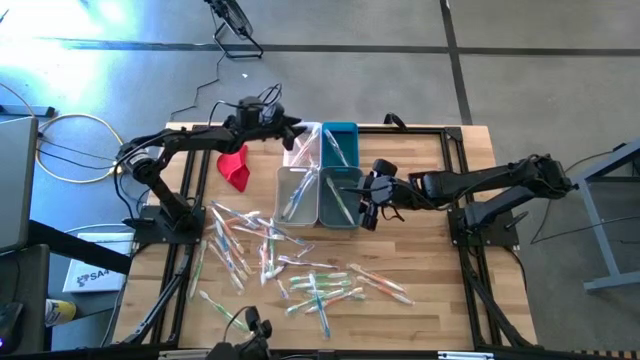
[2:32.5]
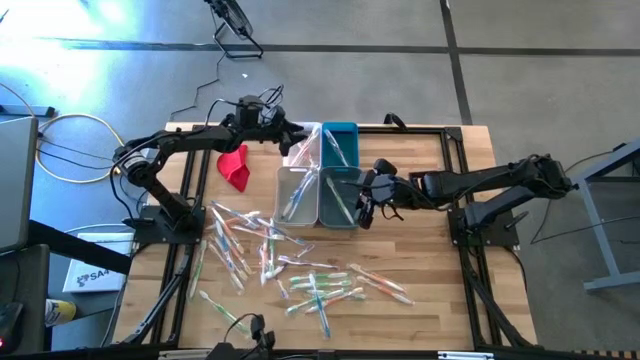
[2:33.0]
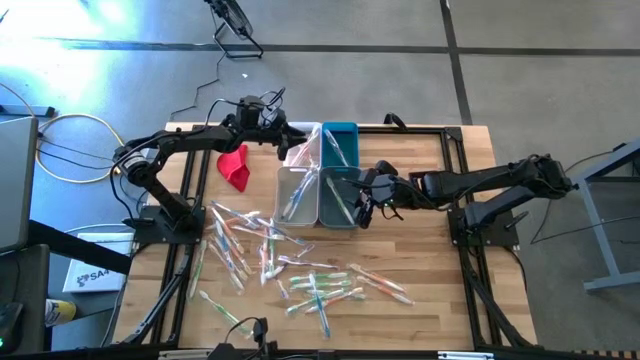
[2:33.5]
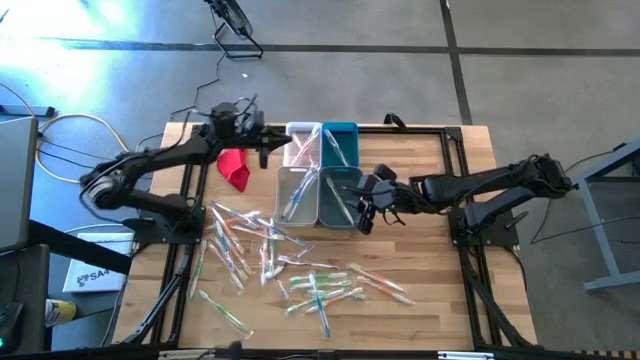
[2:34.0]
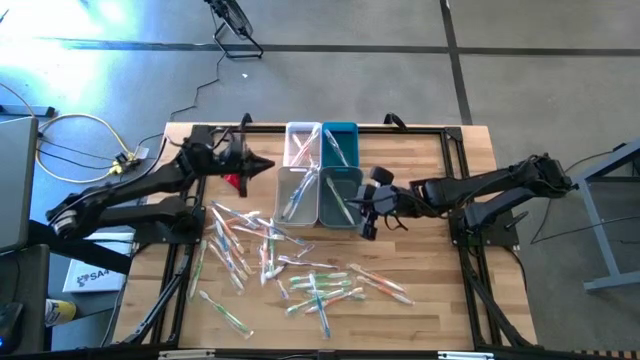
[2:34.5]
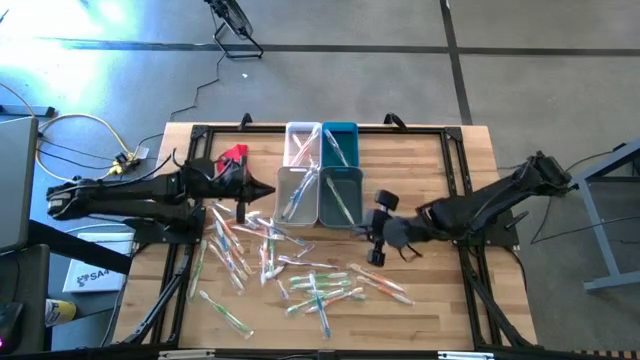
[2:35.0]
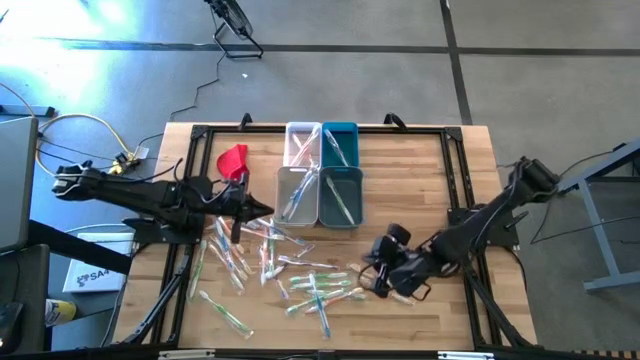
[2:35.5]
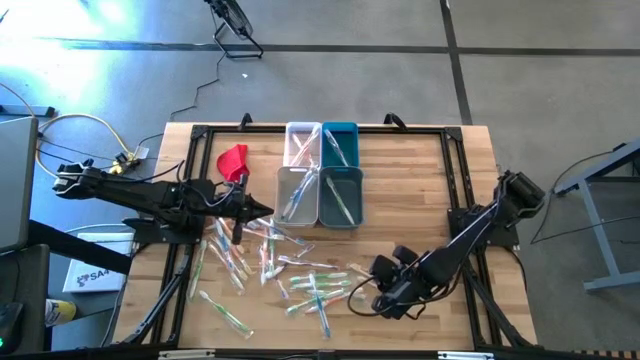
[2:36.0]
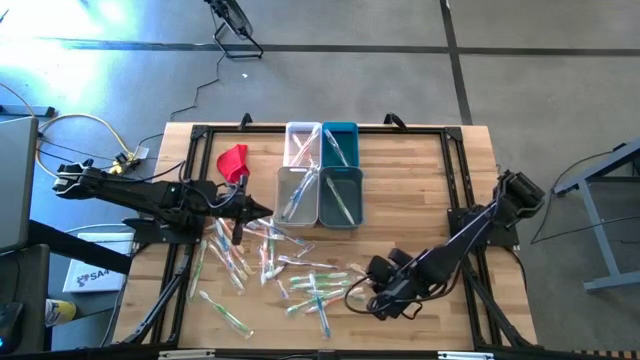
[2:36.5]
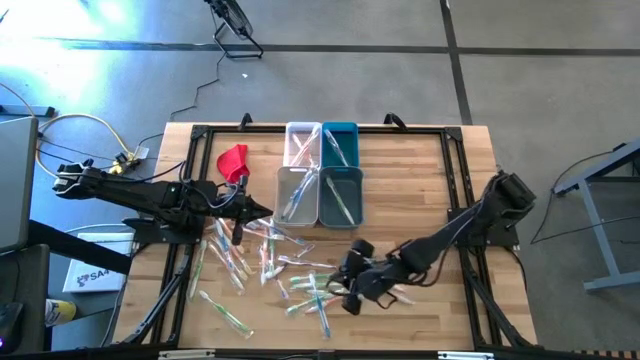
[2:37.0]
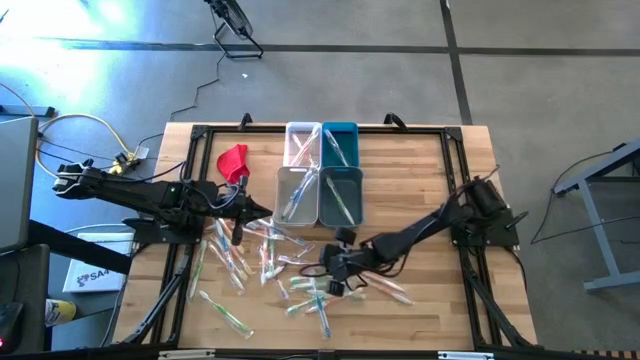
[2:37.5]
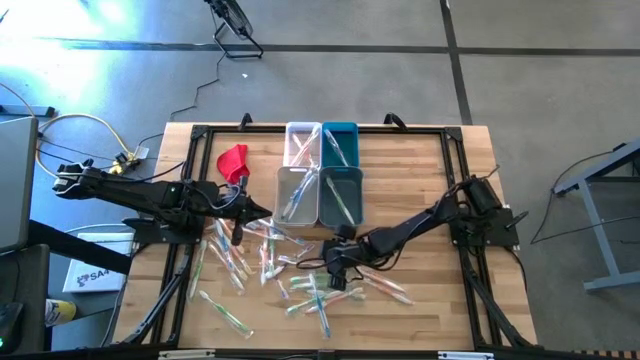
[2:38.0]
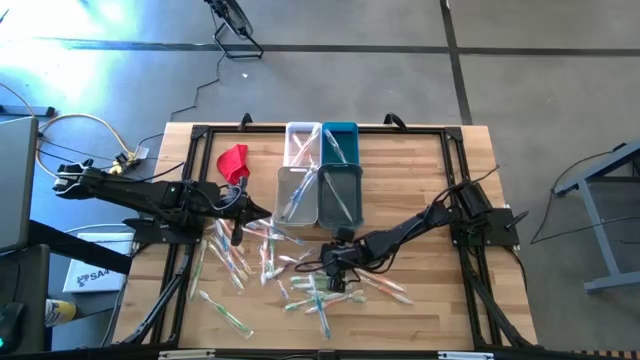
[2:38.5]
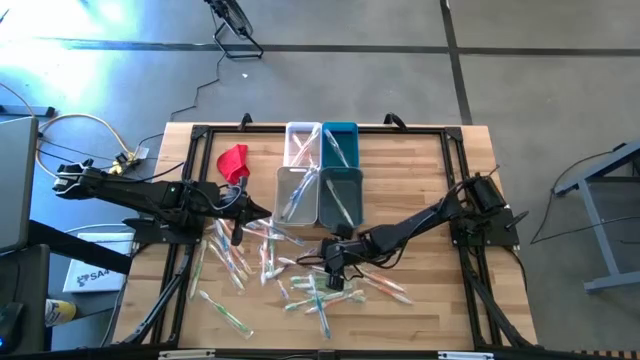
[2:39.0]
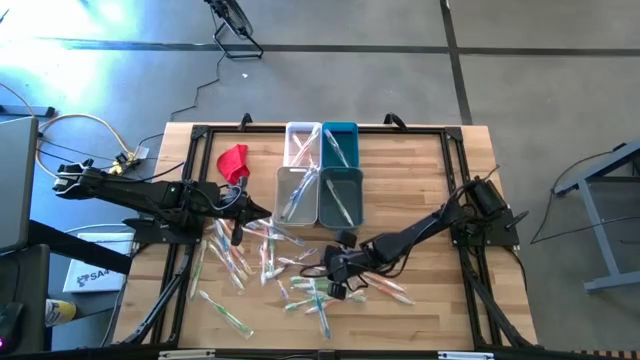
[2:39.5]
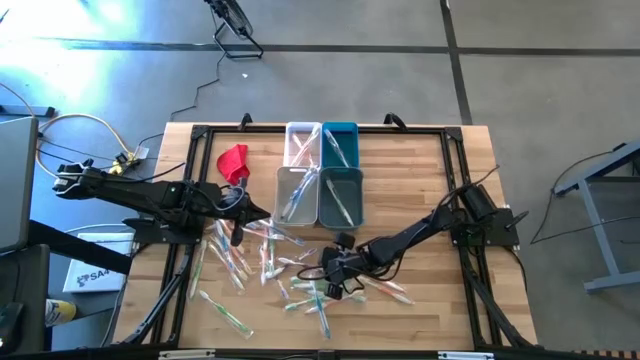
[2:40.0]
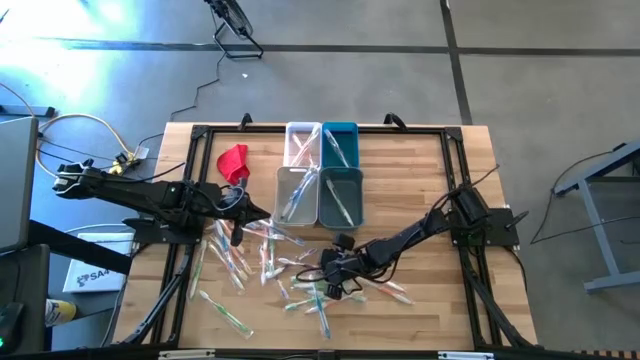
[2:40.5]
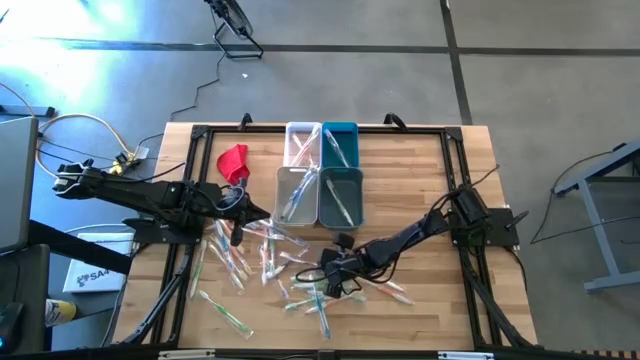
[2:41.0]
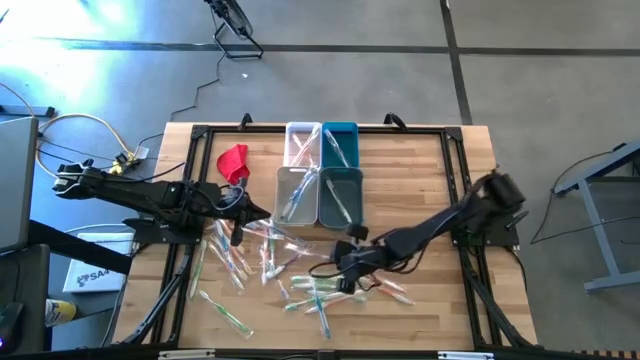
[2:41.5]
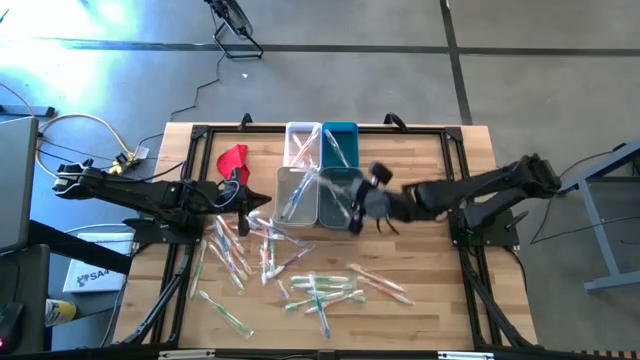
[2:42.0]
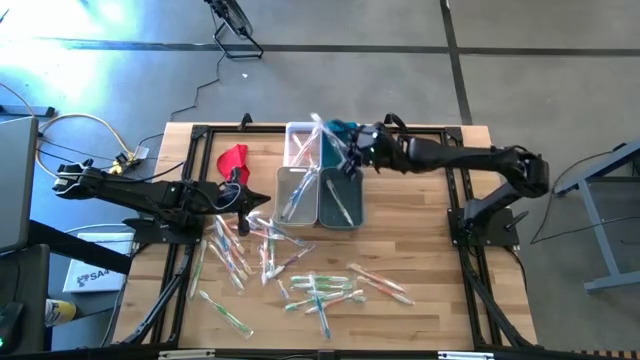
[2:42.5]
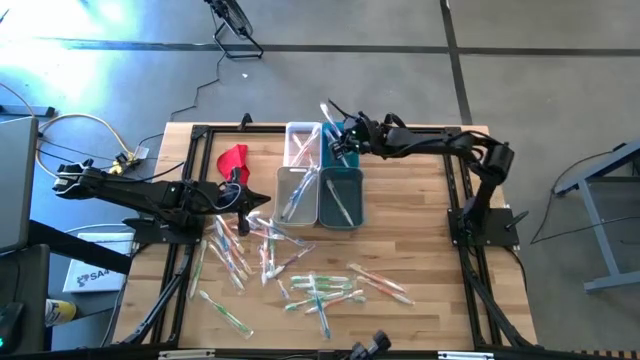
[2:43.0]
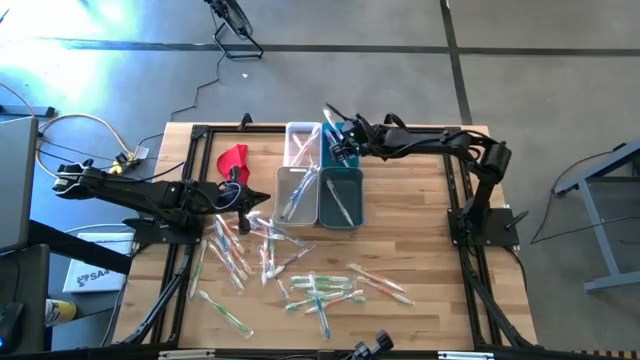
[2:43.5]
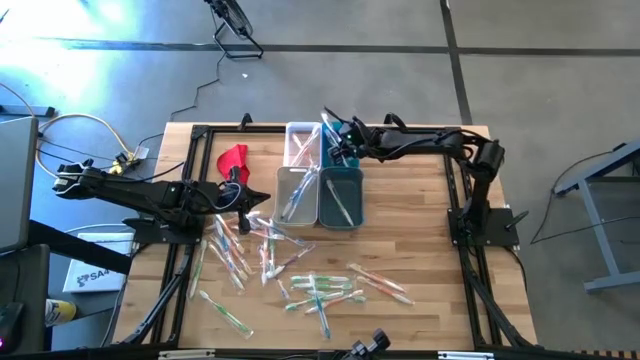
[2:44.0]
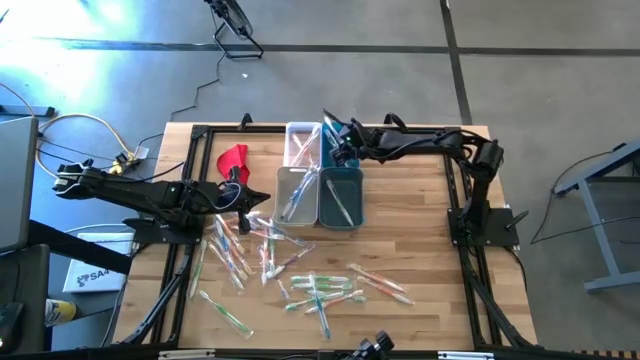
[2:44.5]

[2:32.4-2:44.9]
Task: Pick & Place Toothbrushes
Put the violet toothbrush into the light blue bin

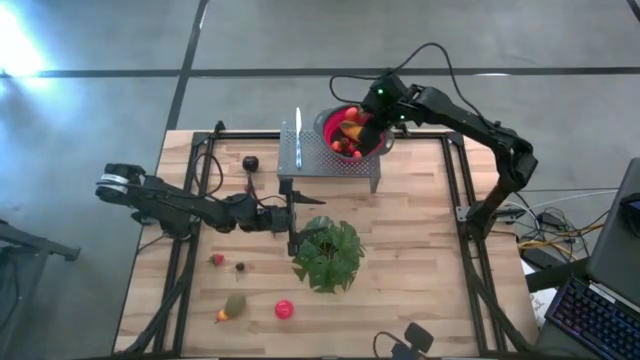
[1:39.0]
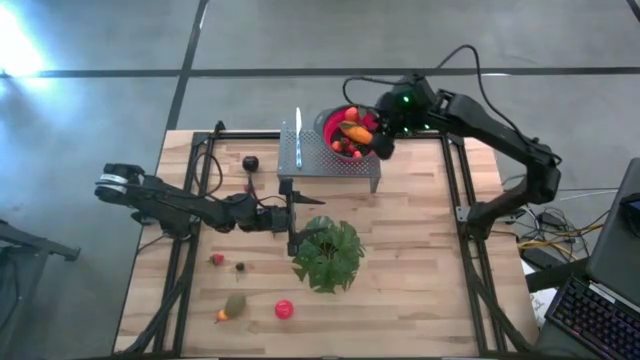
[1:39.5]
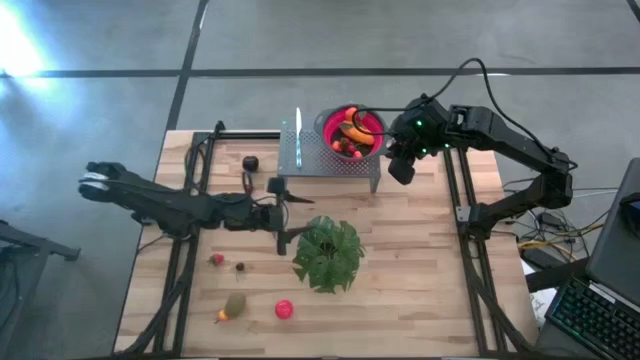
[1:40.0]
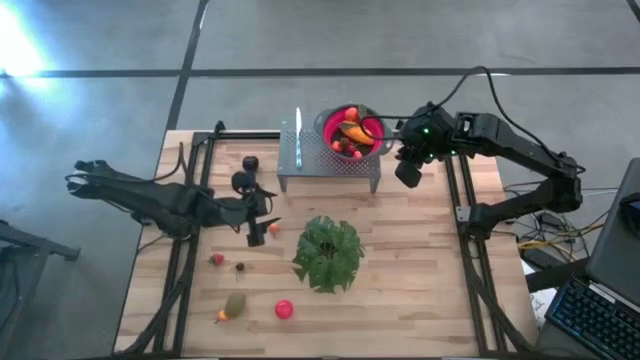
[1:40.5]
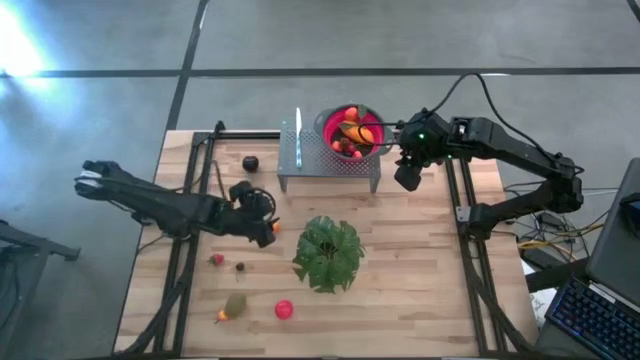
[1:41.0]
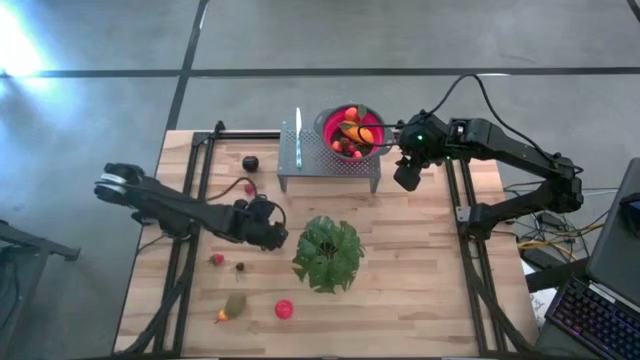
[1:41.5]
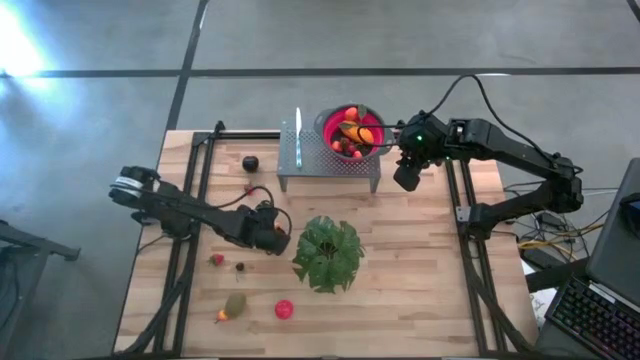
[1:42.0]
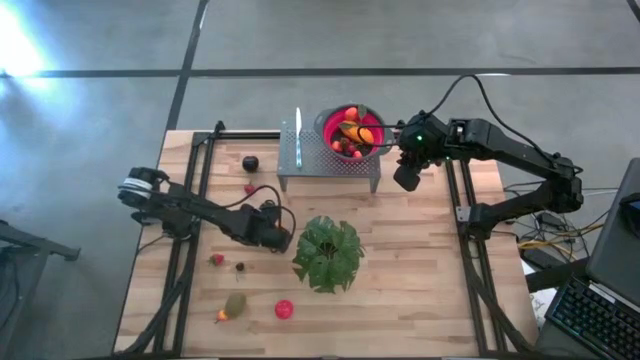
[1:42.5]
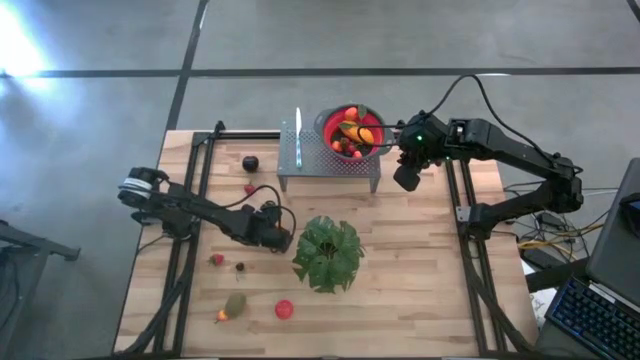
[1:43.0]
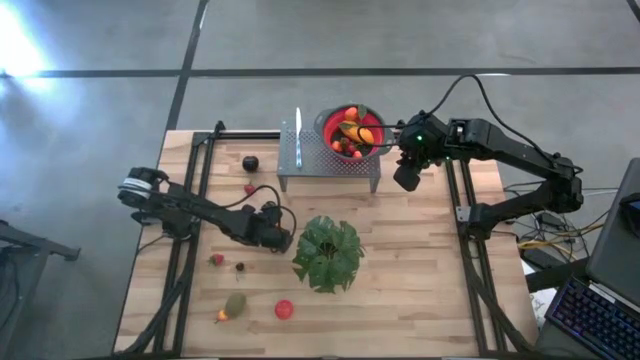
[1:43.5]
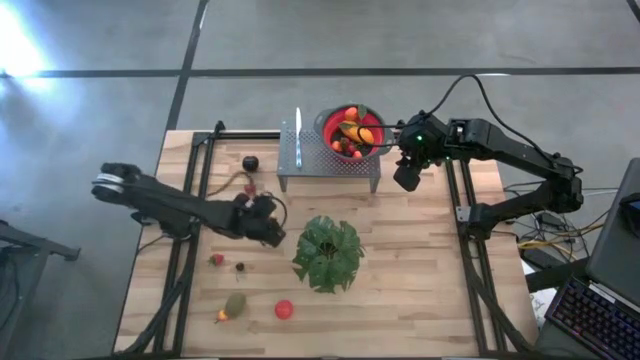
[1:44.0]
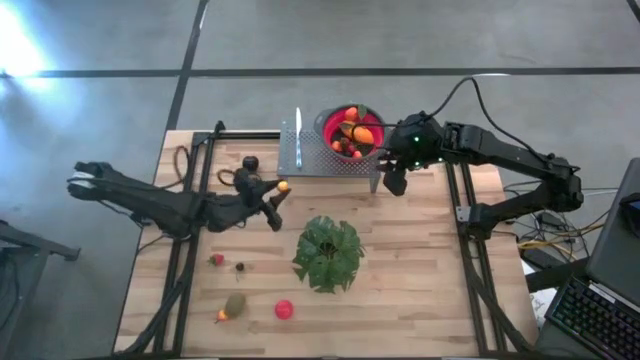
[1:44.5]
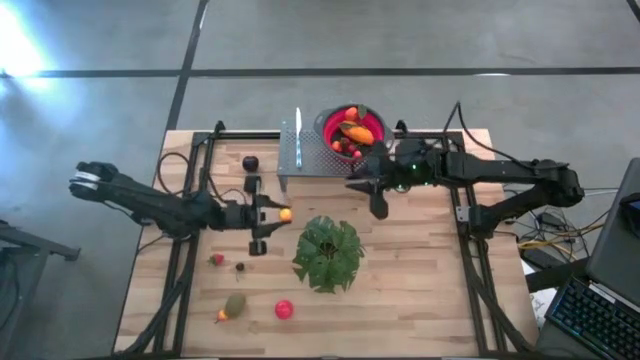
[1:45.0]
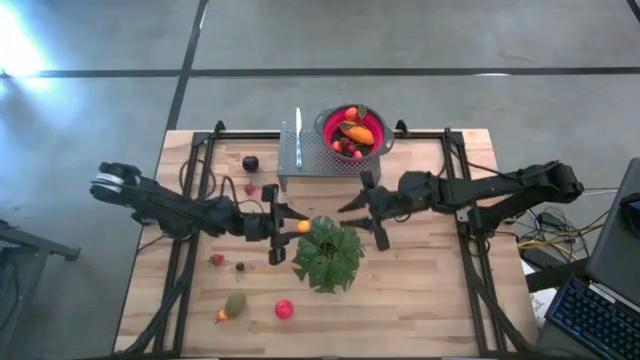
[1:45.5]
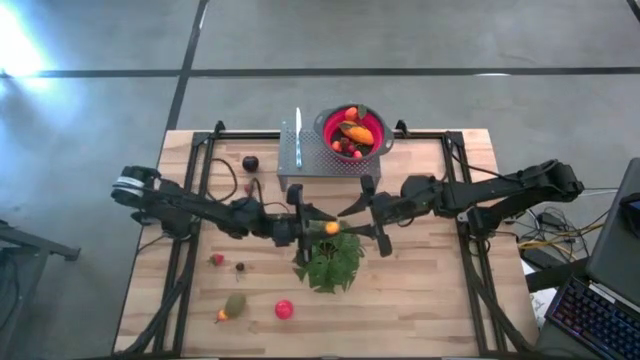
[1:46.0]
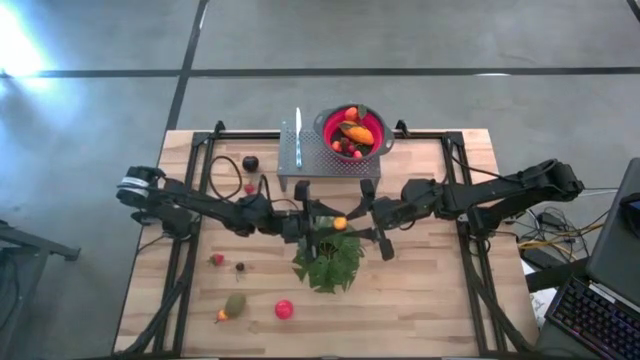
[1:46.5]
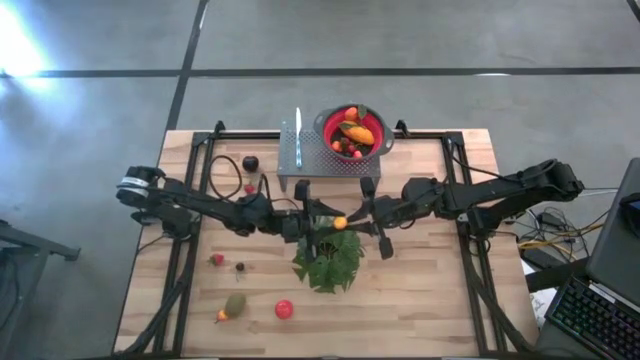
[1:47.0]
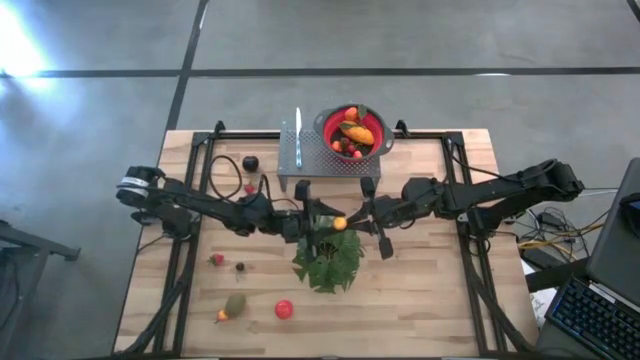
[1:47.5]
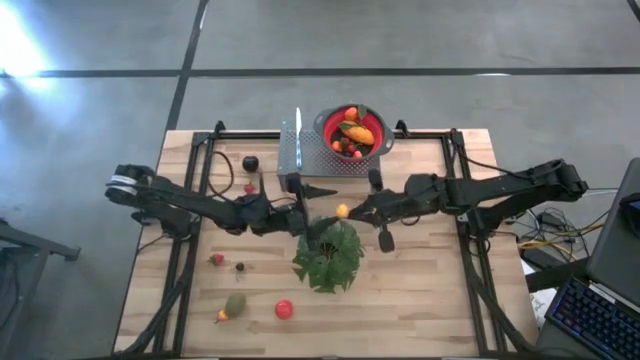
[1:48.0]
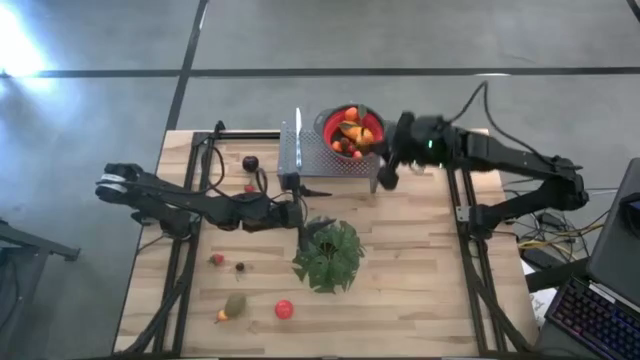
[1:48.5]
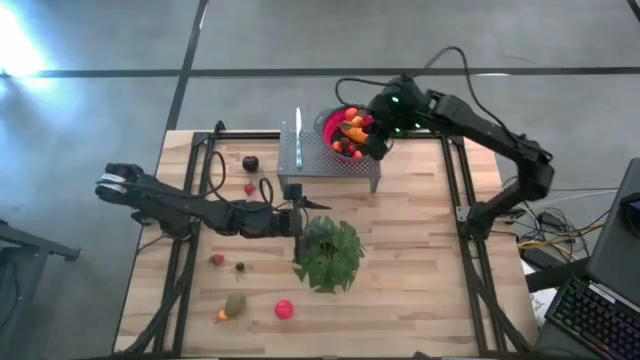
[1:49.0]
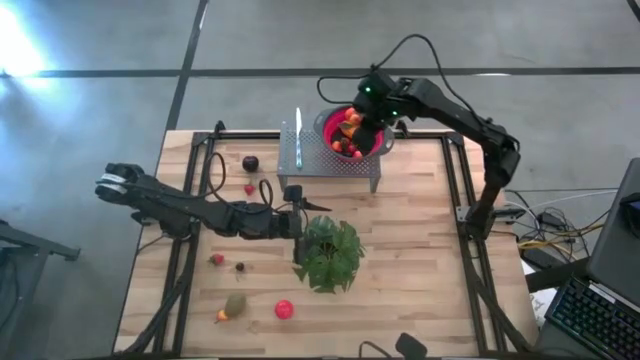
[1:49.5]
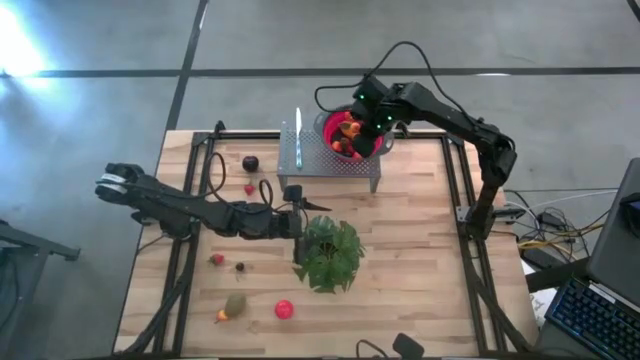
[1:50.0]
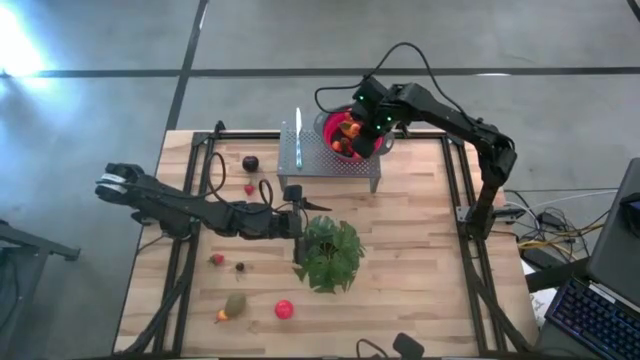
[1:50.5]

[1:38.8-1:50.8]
Task: Pick & Place Fruit
Put the orange pear into the red strainer bowl on the shelf
